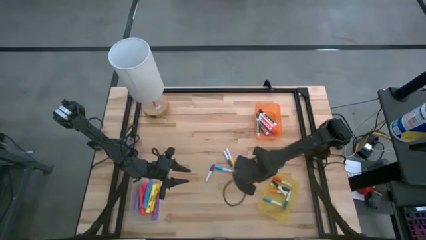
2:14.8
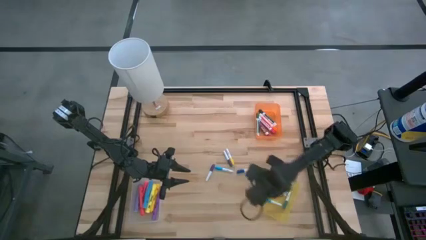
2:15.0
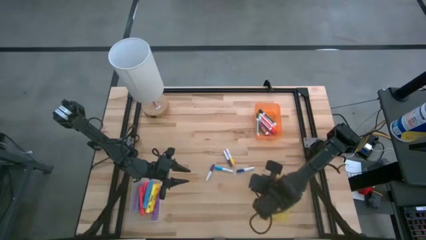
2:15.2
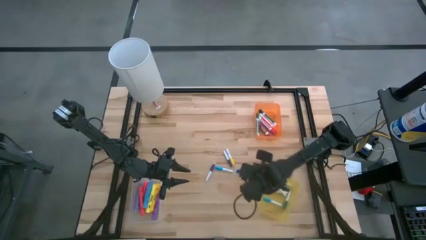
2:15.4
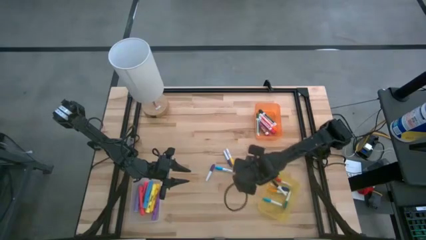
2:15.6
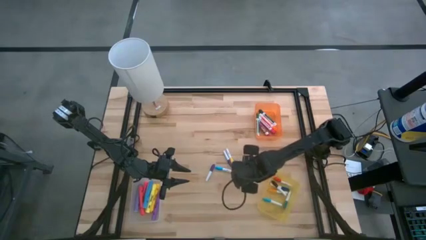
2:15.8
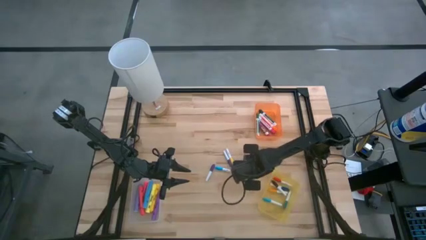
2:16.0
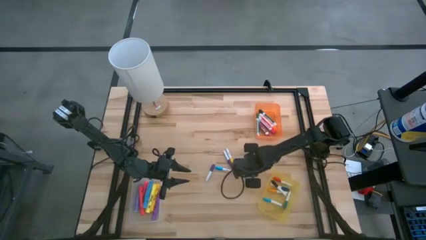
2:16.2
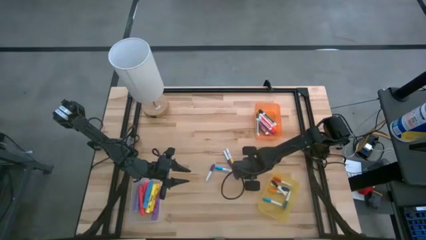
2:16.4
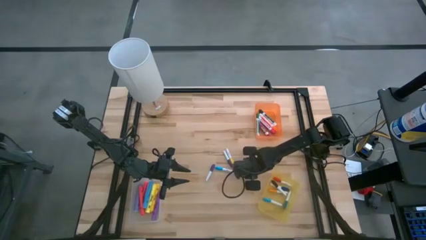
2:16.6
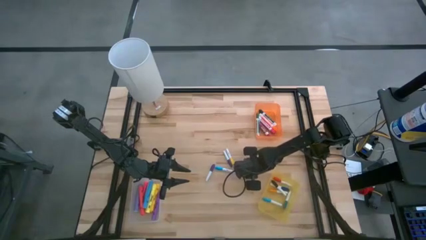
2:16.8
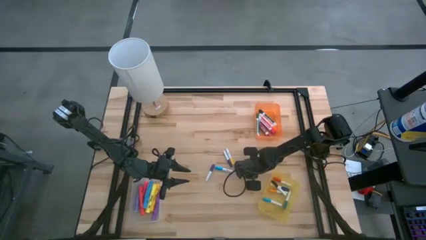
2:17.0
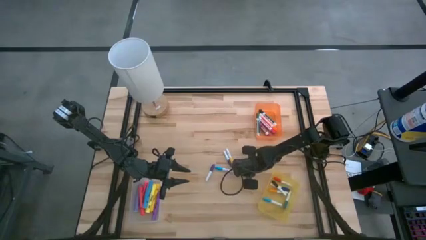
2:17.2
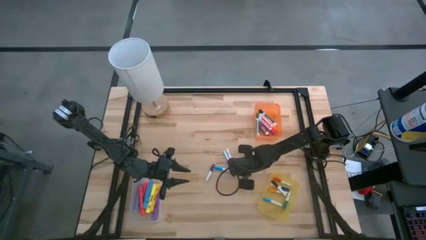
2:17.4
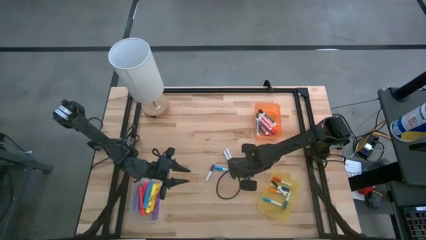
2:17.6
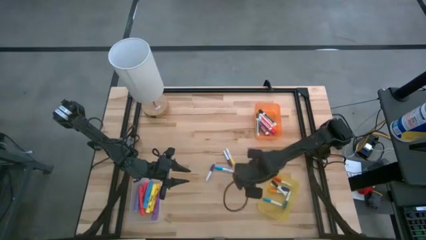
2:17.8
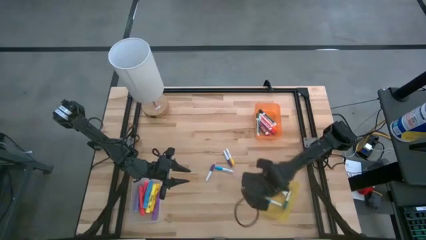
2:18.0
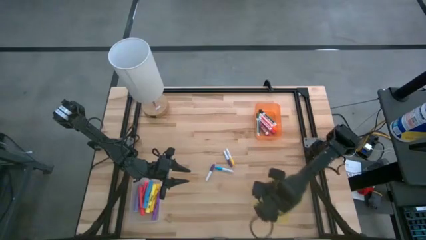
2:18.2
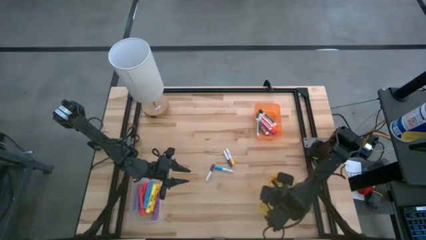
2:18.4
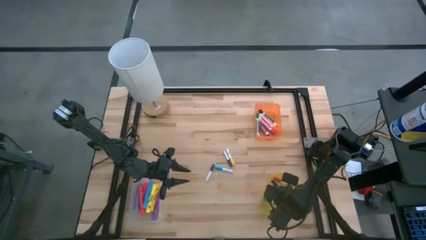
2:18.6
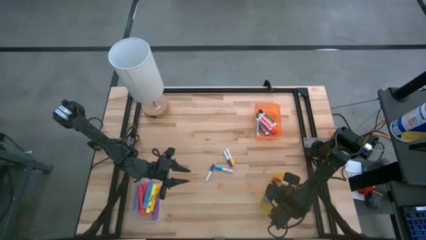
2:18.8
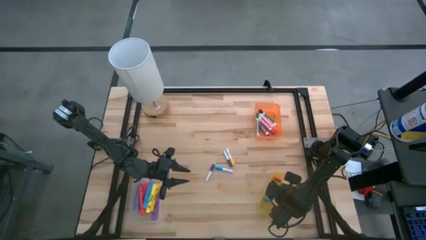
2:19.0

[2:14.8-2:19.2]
Task: Pick & Place Markers
Put the blue highlighter pen into the yellow bin

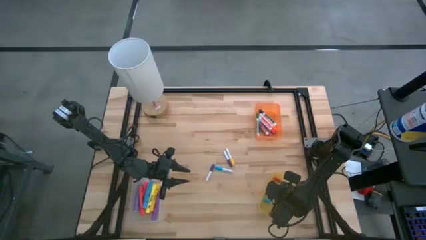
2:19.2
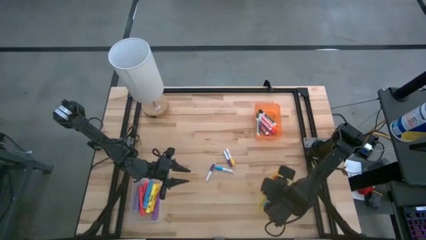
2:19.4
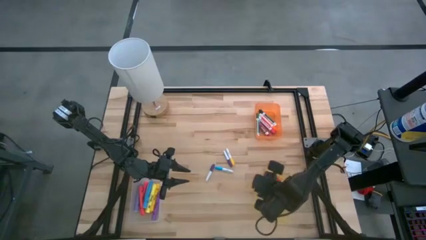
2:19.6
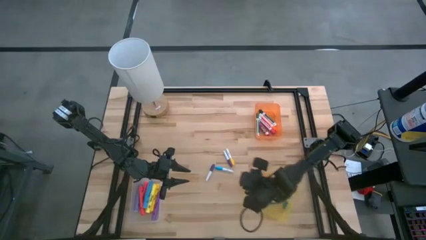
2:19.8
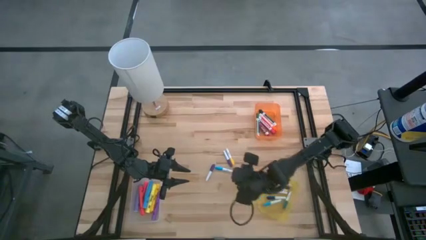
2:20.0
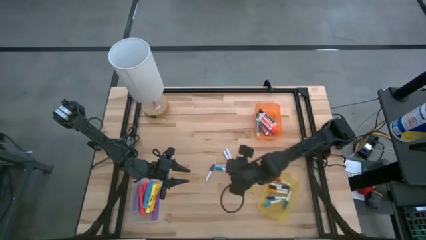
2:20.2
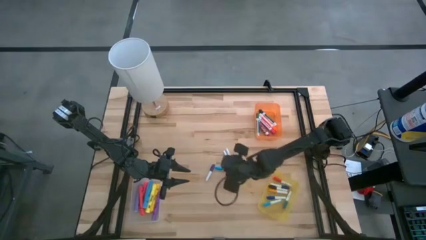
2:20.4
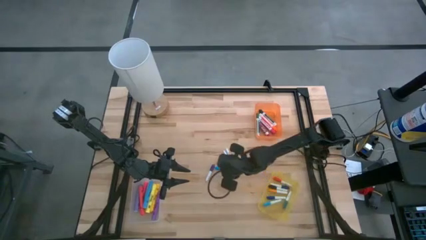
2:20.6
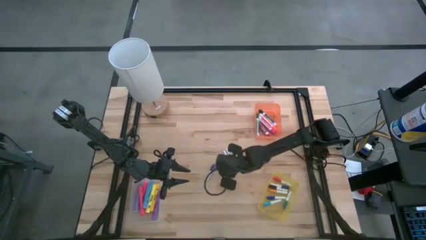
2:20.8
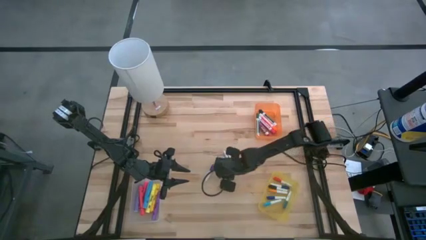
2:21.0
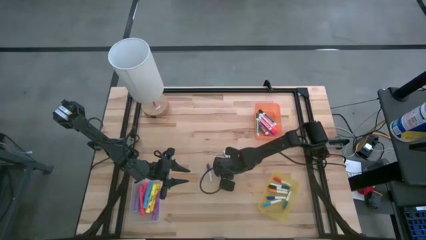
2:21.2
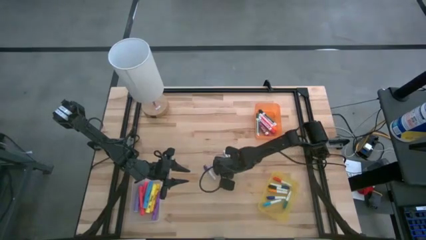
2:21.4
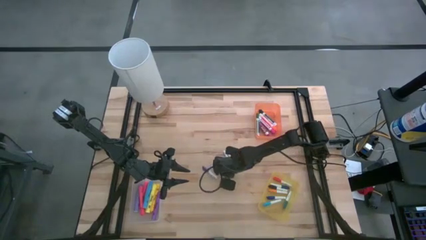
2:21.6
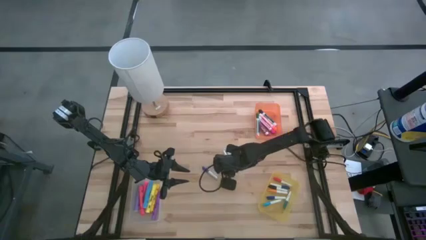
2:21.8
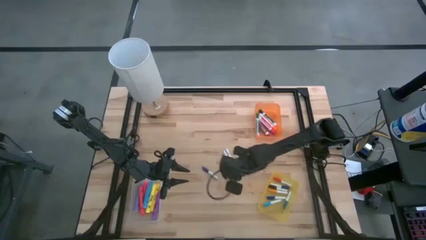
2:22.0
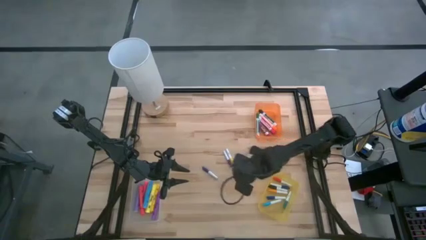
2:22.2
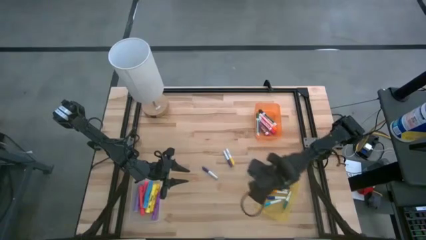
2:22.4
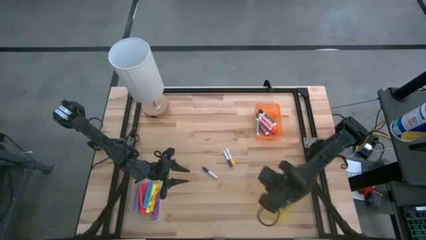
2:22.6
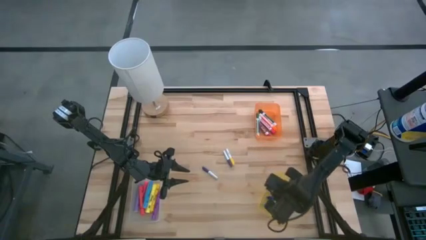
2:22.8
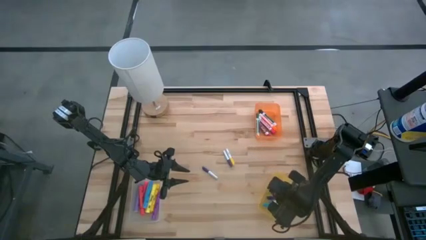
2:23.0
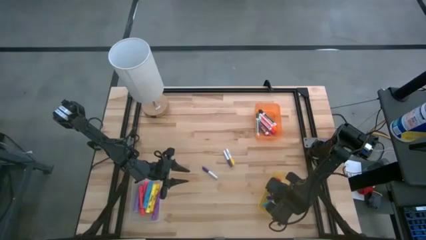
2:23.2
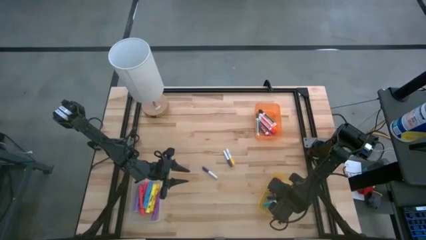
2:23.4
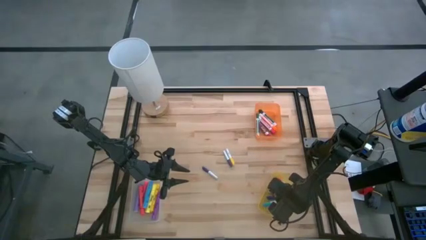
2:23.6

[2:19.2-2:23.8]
Put the blue highlighter pen into the yellow bin

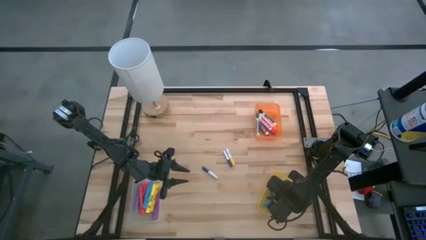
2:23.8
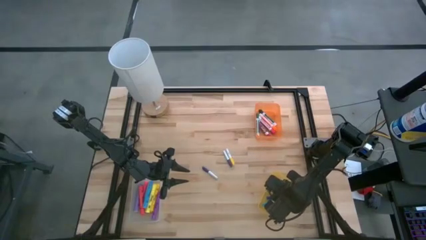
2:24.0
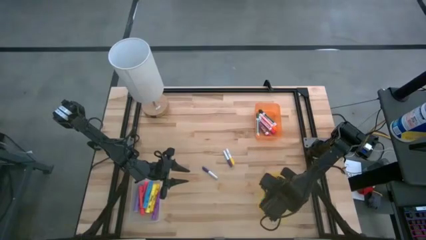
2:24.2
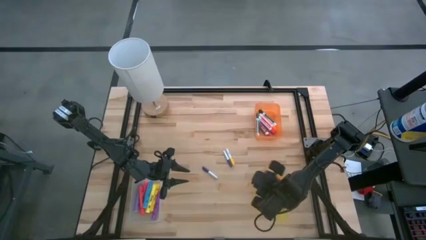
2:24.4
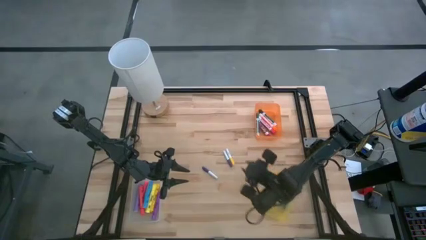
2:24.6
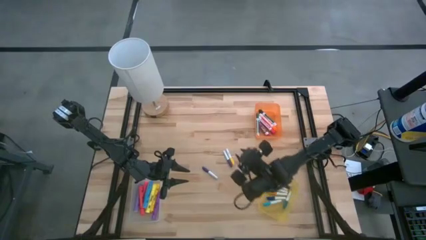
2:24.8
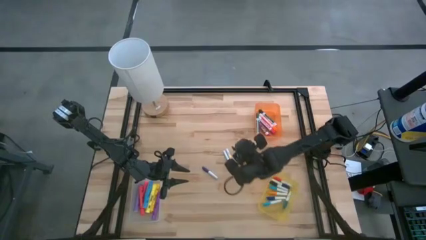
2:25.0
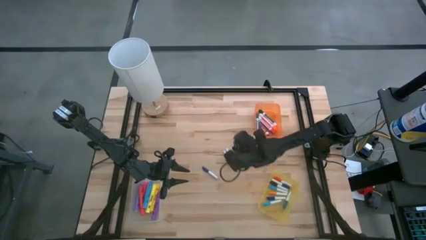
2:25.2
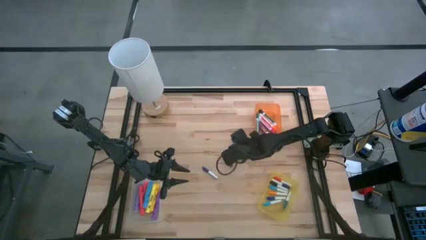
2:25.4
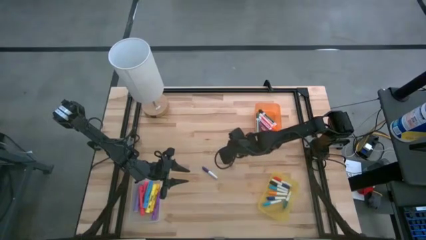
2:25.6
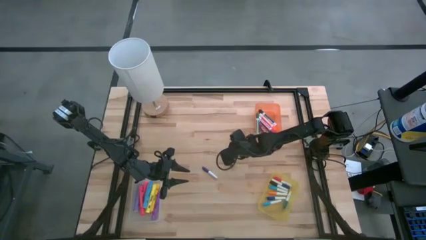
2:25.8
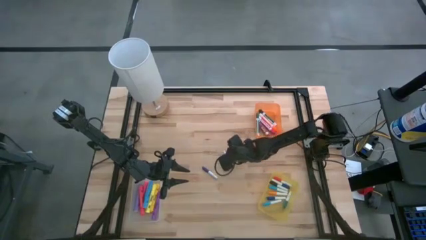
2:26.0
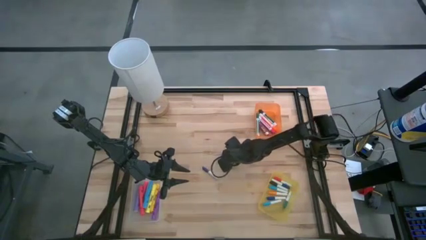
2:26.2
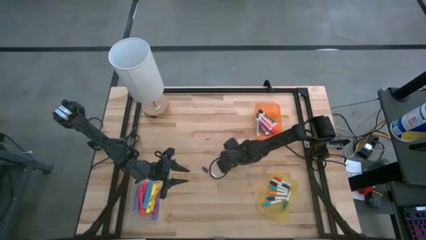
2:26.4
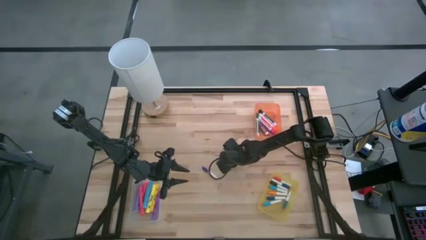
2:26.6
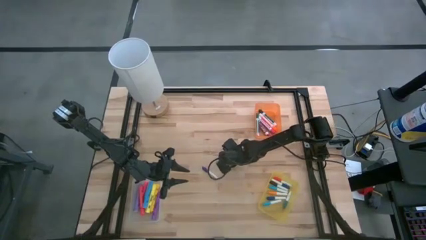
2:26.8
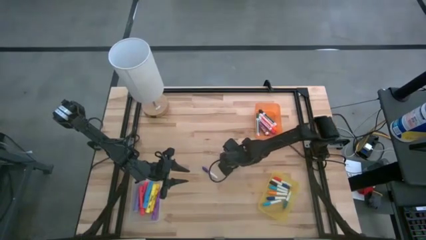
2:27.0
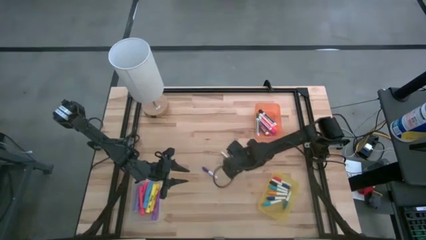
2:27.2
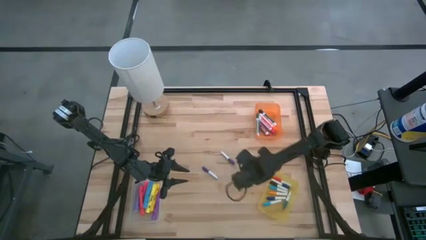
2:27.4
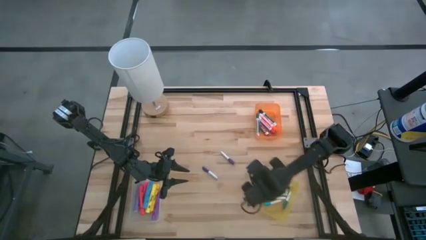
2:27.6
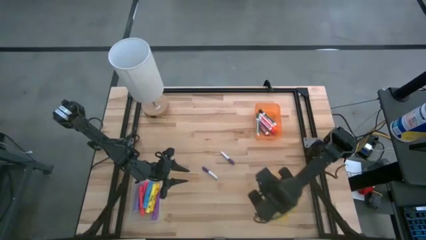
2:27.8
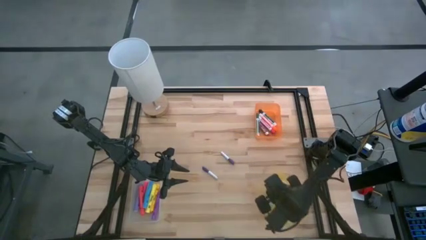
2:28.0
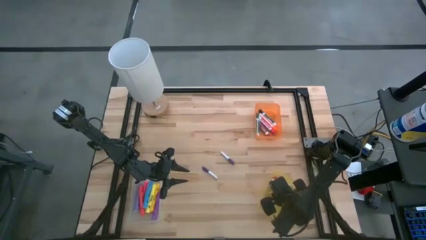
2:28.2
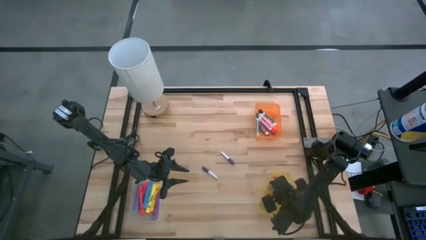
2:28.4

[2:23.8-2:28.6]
Put the yellow highlighter pen into the yellow bin

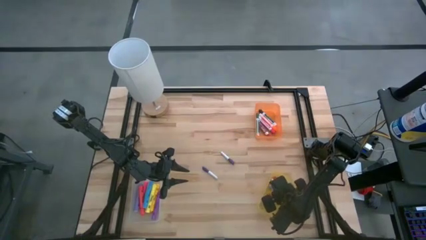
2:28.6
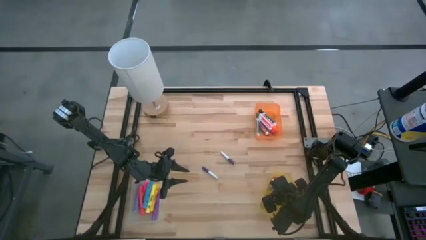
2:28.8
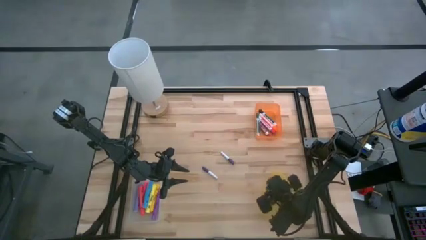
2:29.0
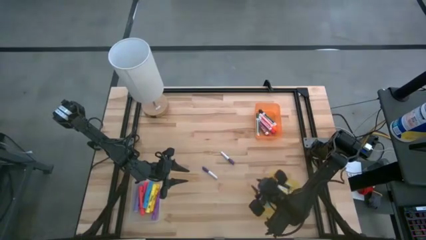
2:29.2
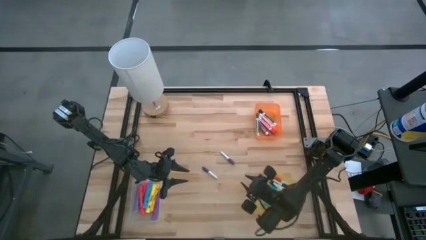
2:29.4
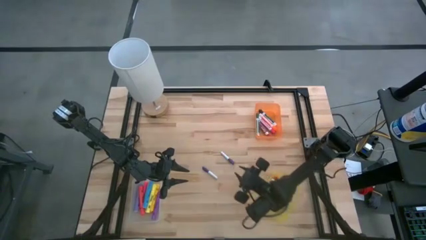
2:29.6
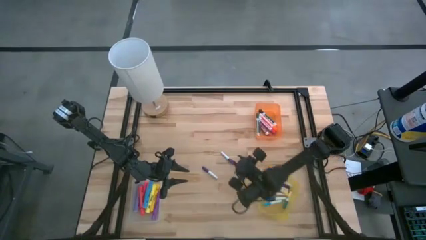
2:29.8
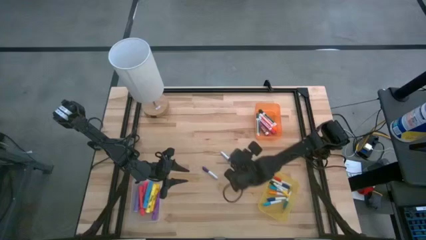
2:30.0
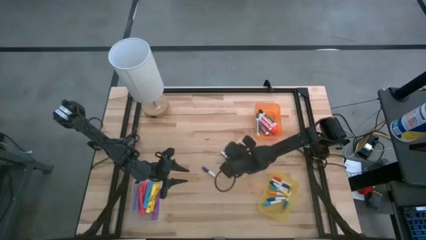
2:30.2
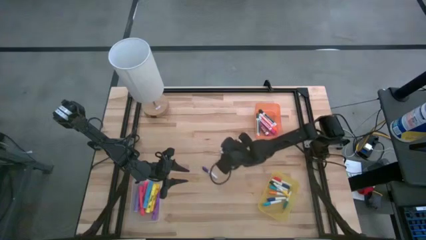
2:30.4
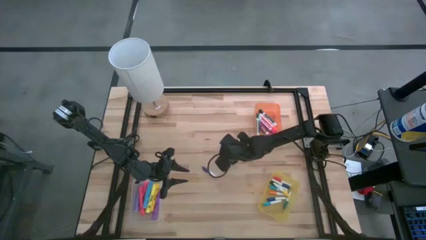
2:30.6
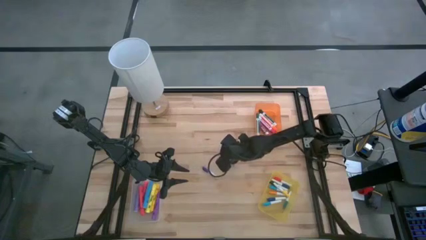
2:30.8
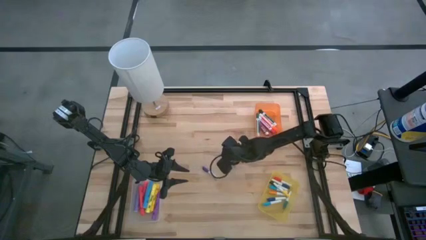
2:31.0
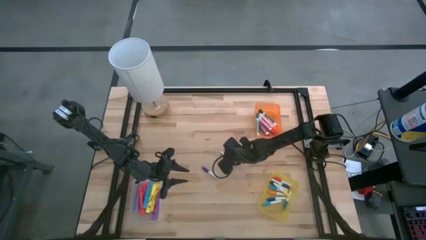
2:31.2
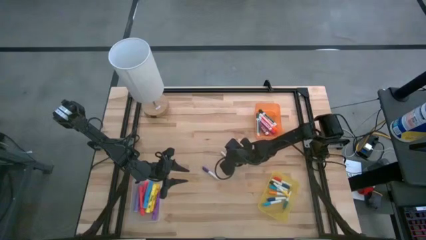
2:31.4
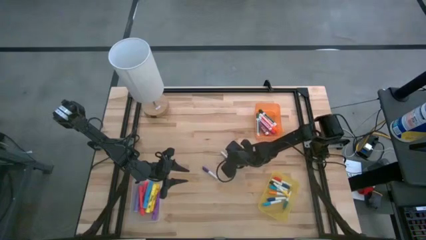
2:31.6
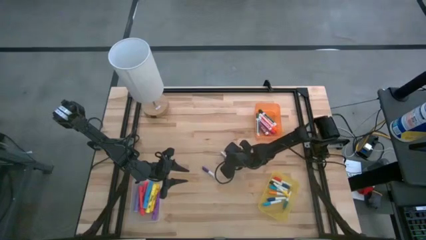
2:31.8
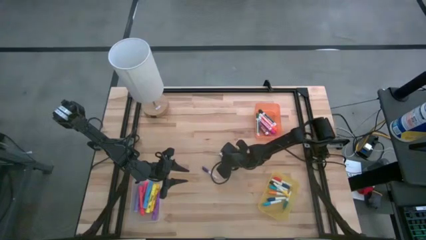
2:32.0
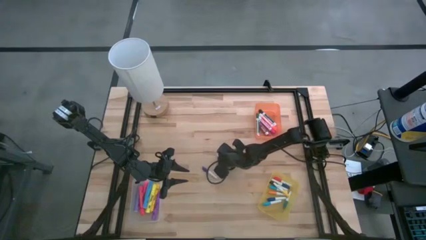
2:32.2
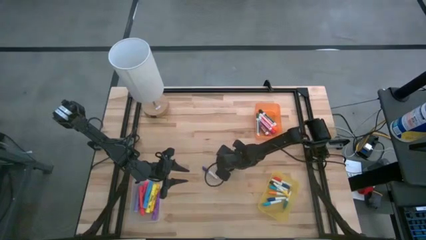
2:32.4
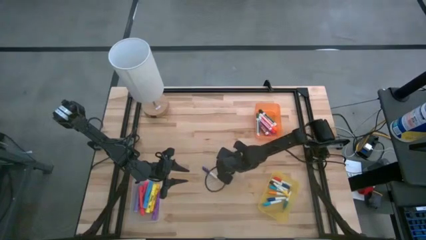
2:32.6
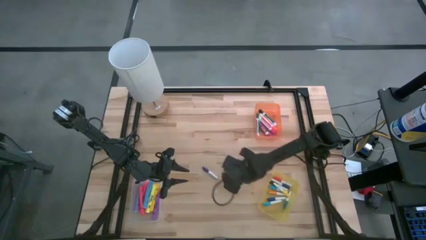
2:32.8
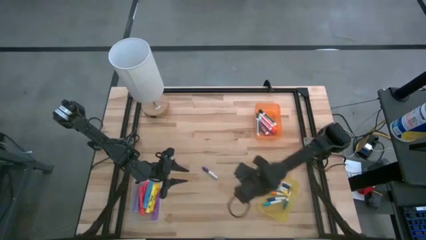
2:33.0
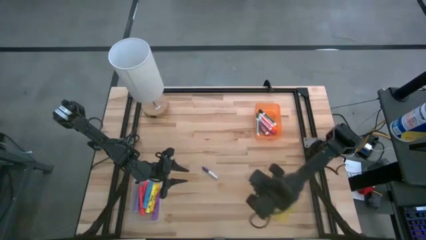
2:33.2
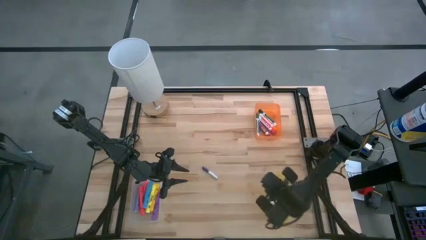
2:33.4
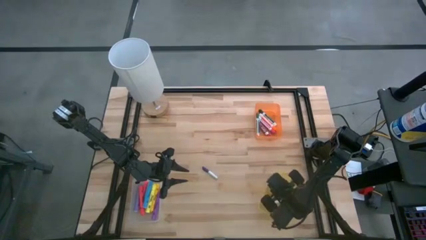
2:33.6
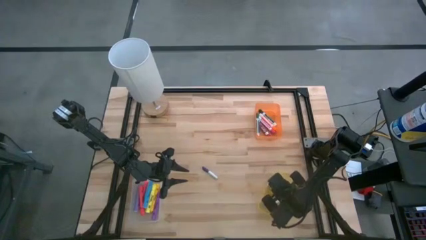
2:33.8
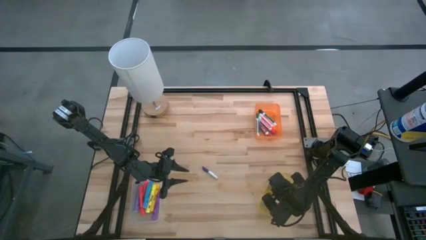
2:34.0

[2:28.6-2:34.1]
Put the violet highlighter pen into the yellow bin
